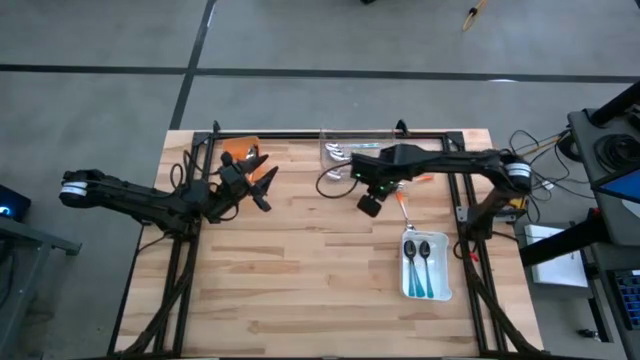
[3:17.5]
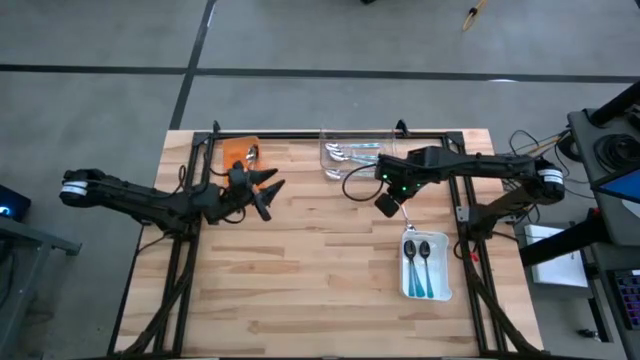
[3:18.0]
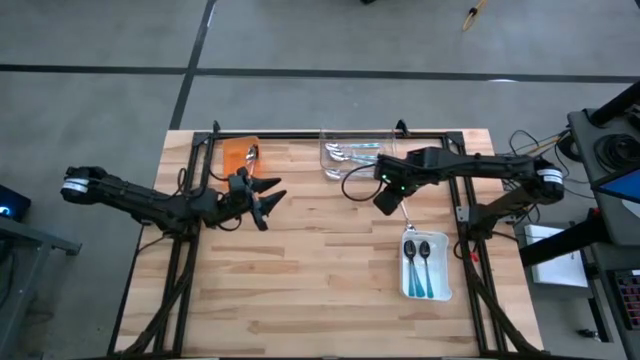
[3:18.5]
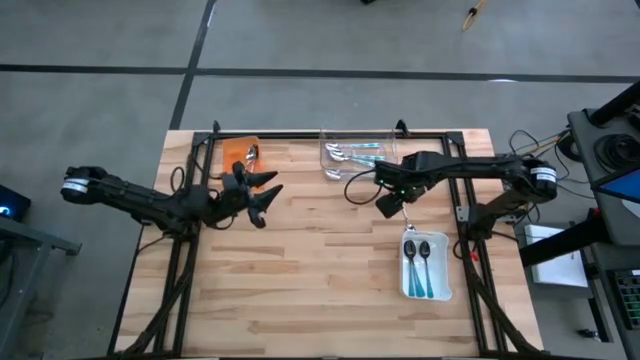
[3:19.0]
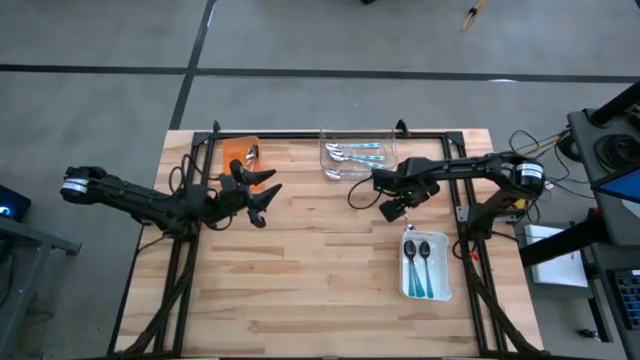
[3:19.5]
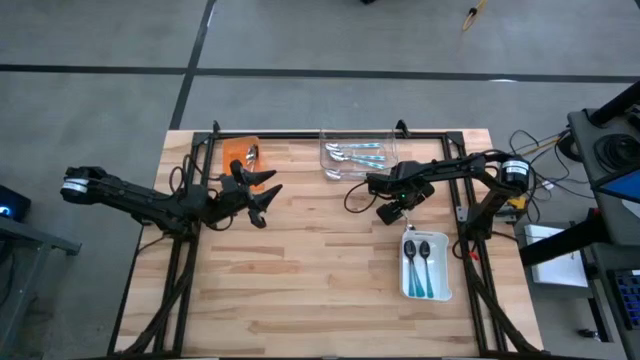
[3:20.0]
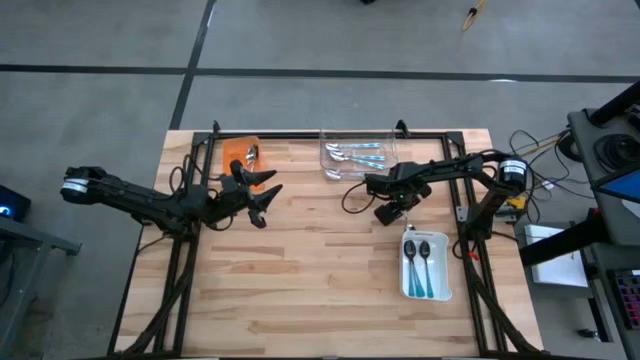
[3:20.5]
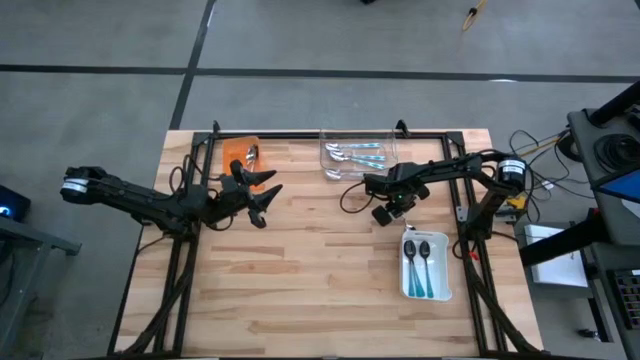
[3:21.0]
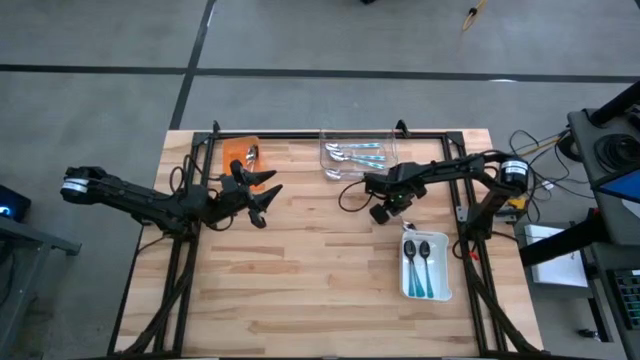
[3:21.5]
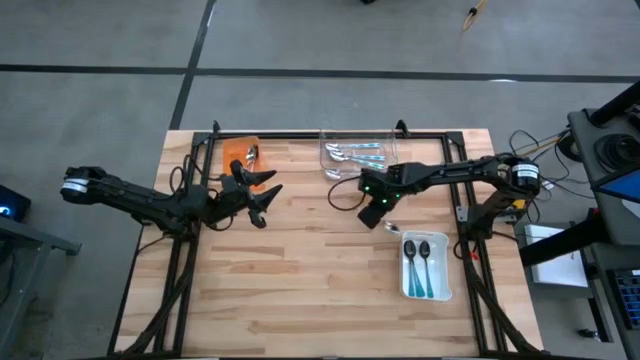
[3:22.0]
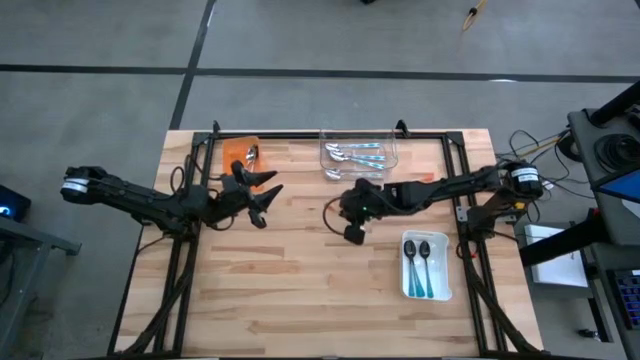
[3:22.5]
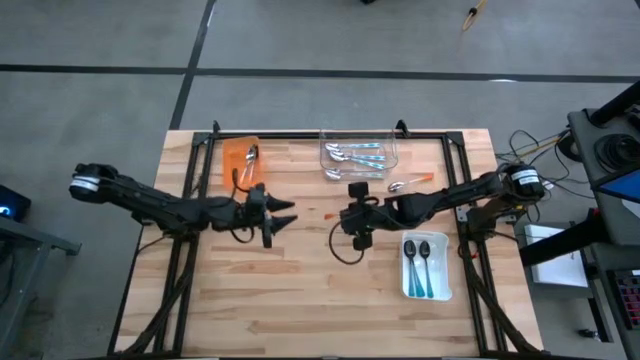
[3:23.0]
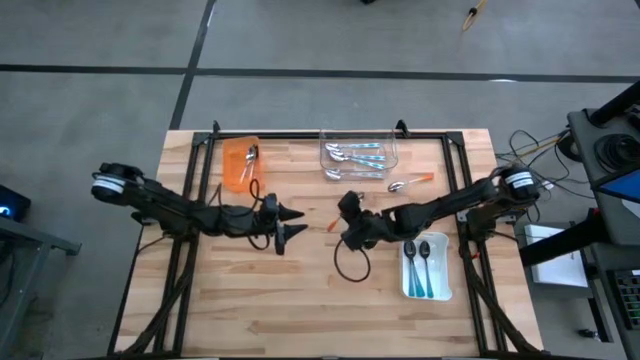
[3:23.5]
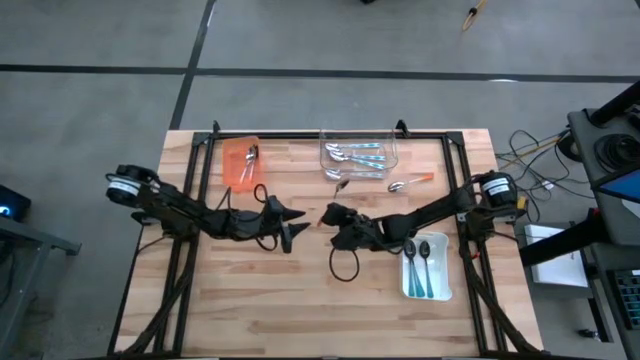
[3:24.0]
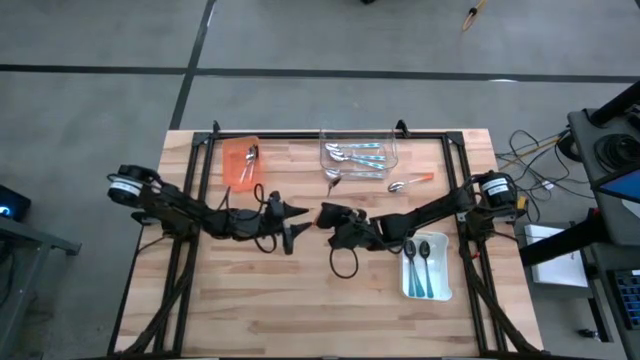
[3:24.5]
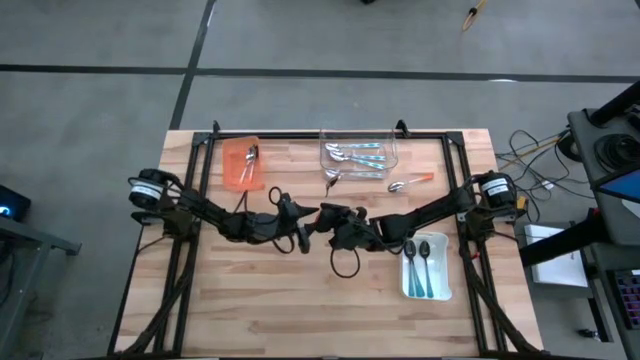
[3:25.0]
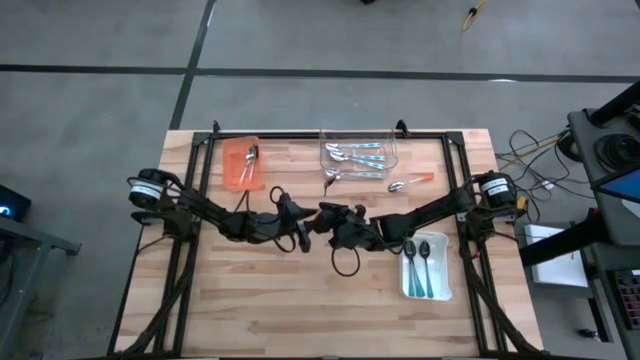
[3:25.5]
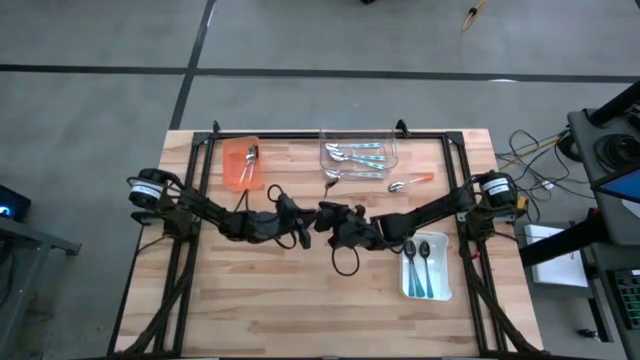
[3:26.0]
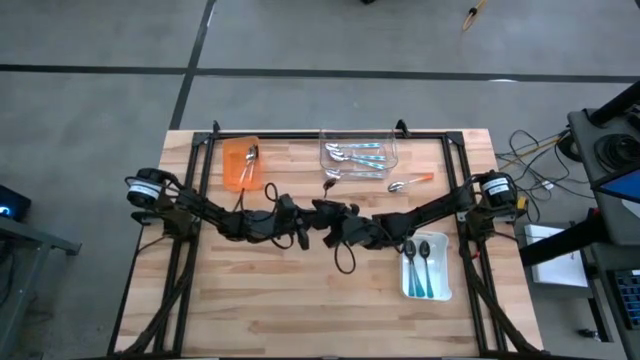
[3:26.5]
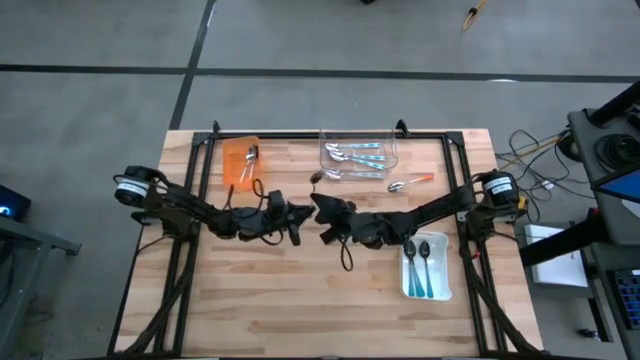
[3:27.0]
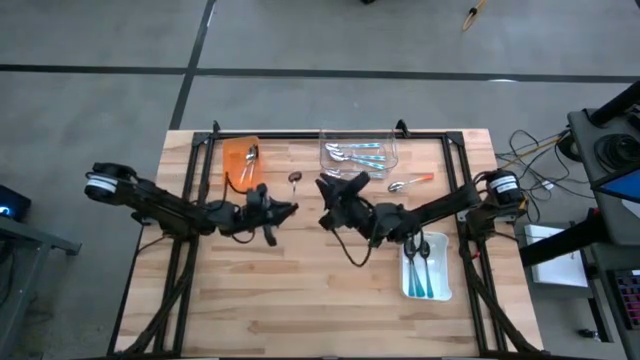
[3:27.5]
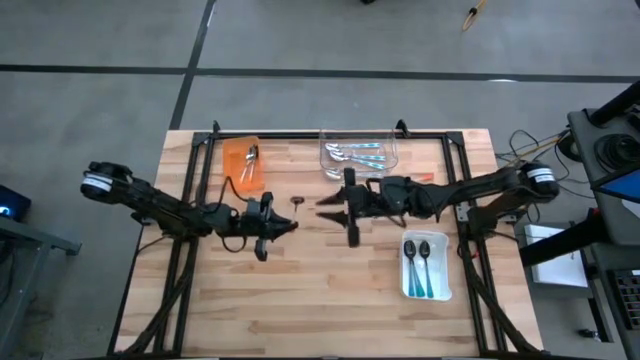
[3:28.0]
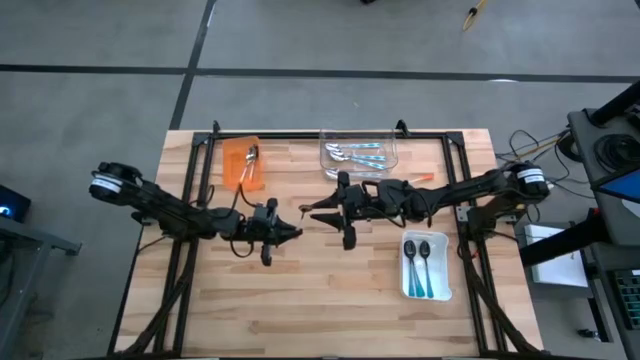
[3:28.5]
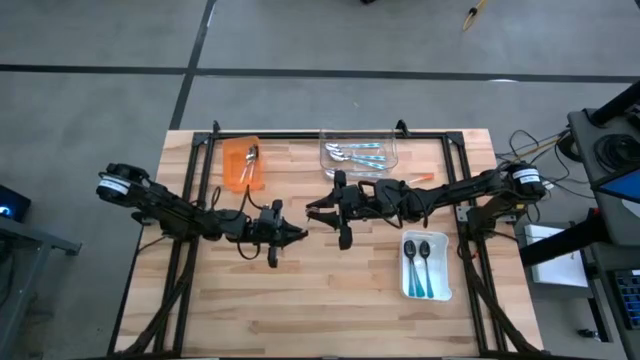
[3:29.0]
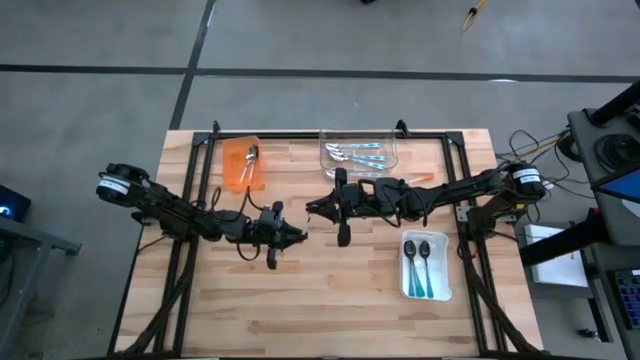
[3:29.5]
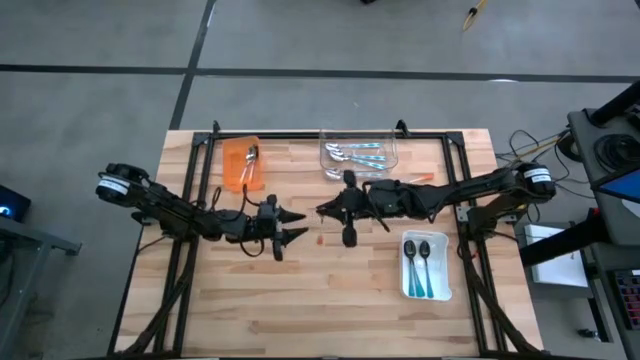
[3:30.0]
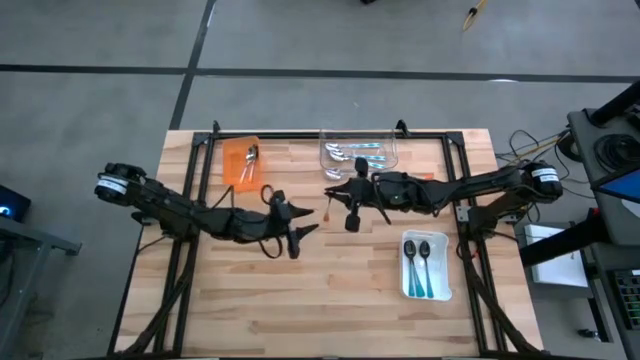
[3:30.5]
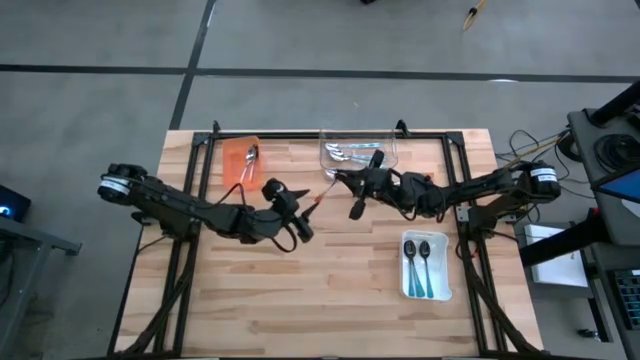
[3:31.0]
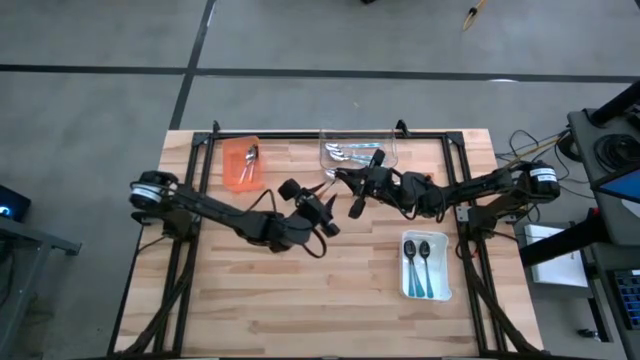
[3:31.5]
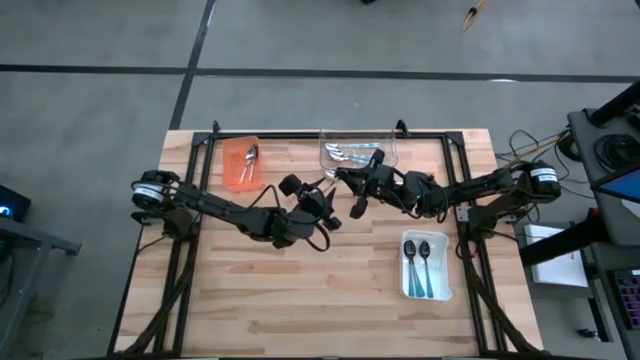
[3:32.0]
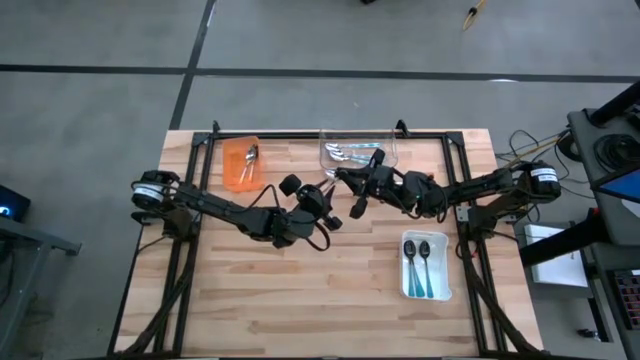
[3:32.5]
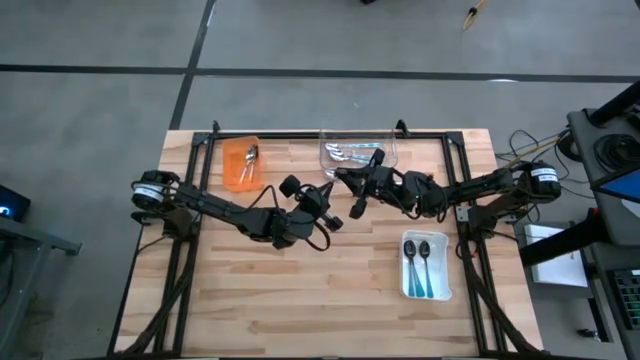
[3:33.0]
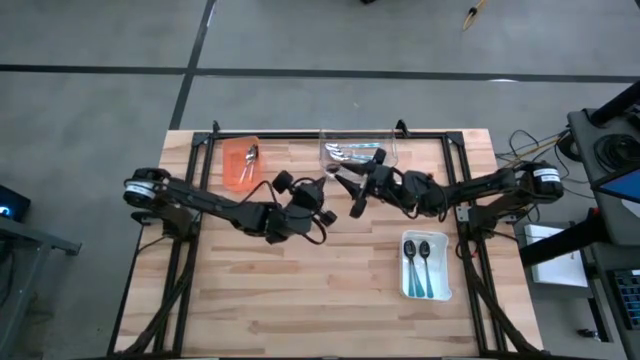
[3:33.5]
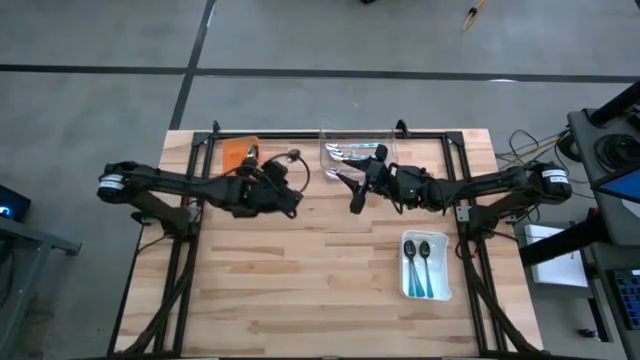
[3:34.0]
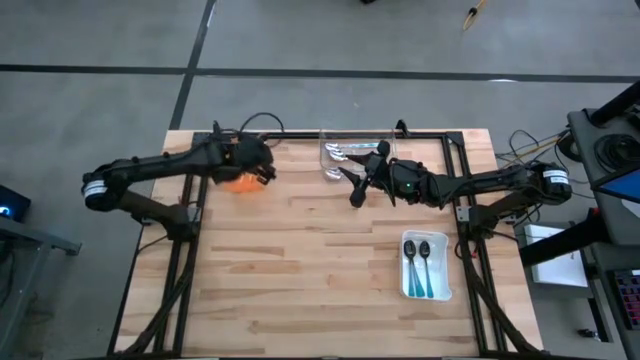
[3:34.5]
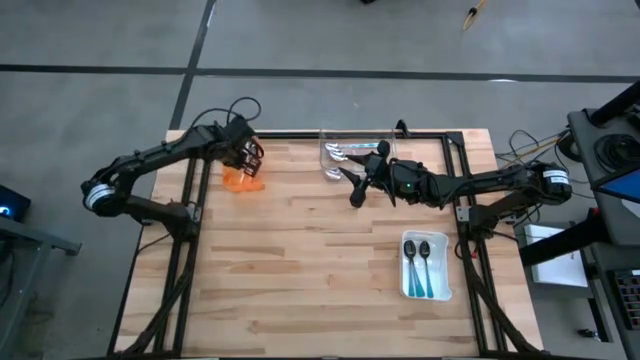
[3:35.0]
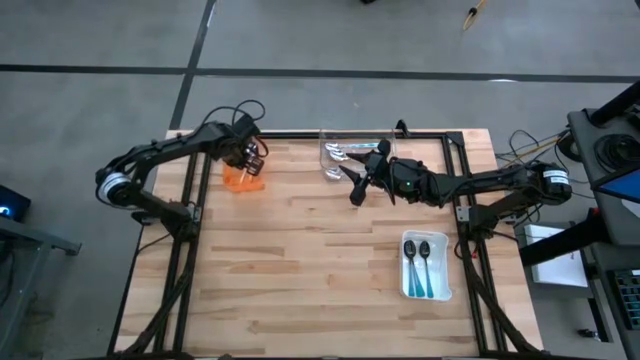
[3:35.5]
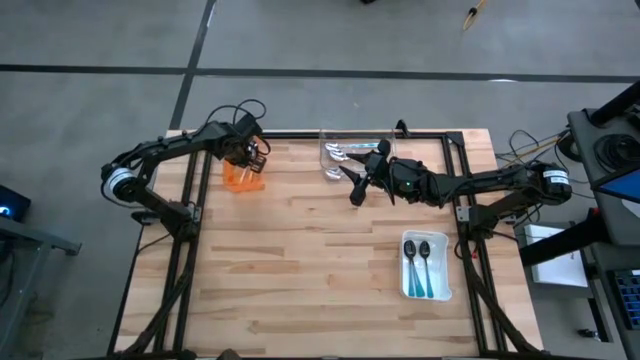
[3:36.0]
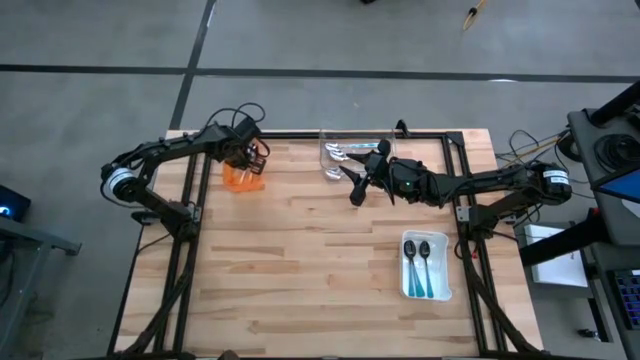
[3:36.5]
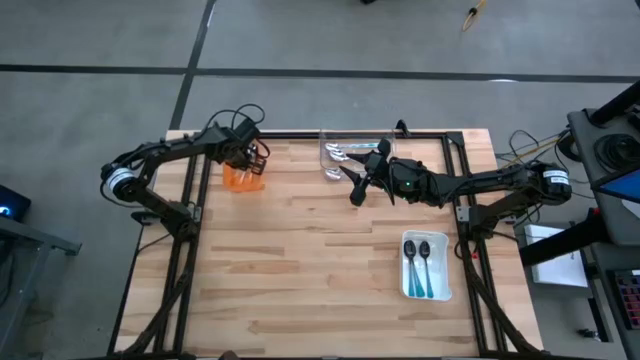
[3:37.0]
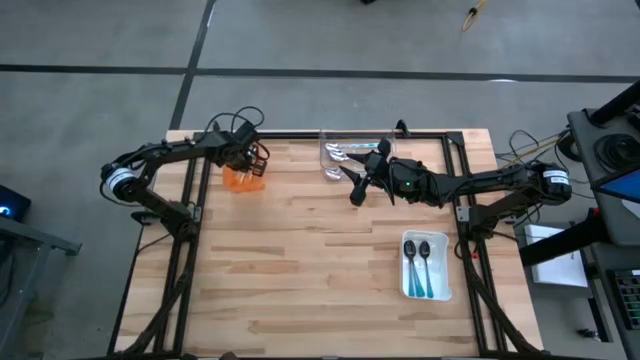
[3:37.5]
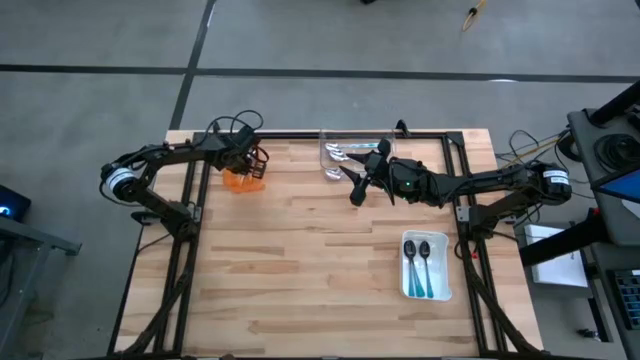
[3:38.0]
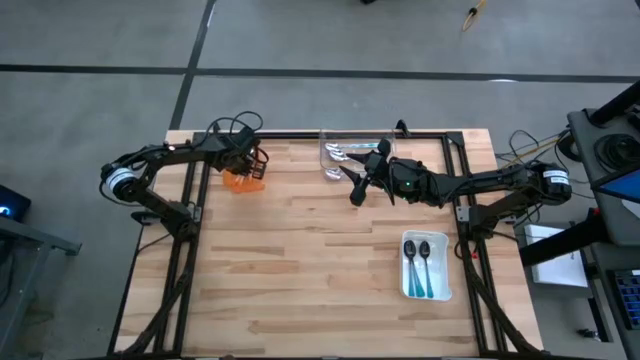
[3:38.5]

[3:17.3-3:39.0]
Task: Sort silverware by color (type)
Put the orange spoon into the orange bin
